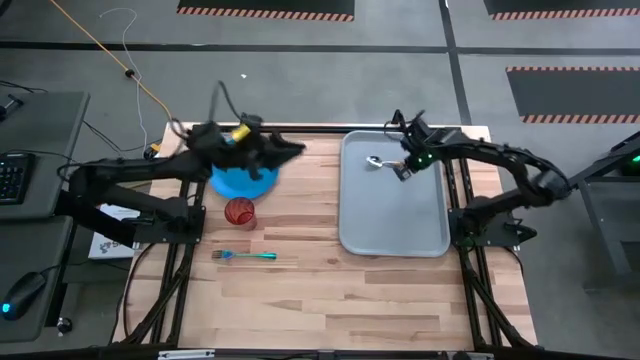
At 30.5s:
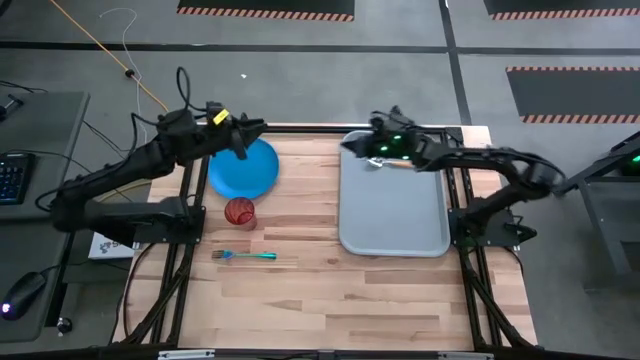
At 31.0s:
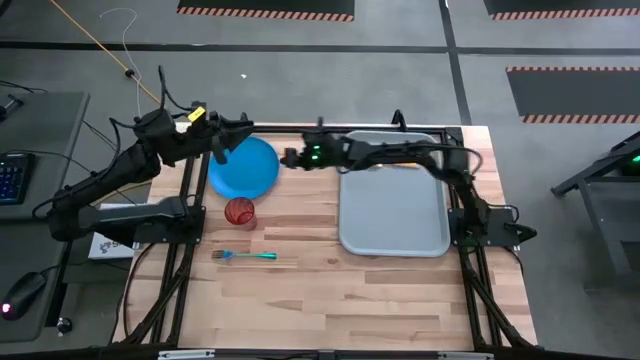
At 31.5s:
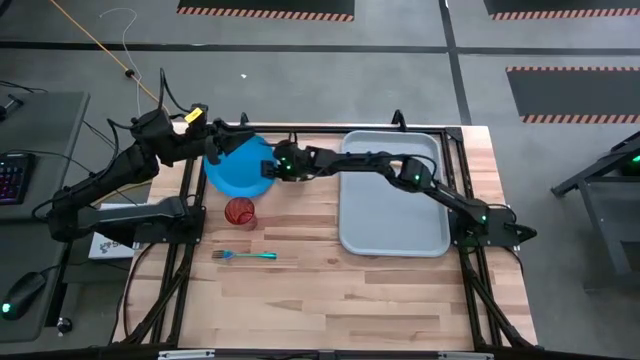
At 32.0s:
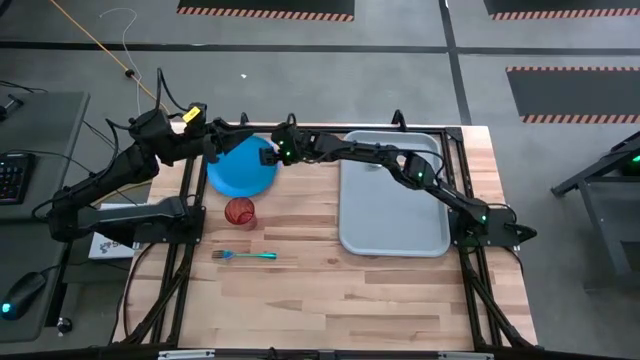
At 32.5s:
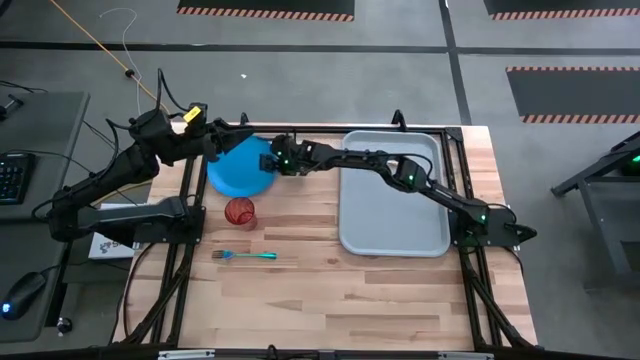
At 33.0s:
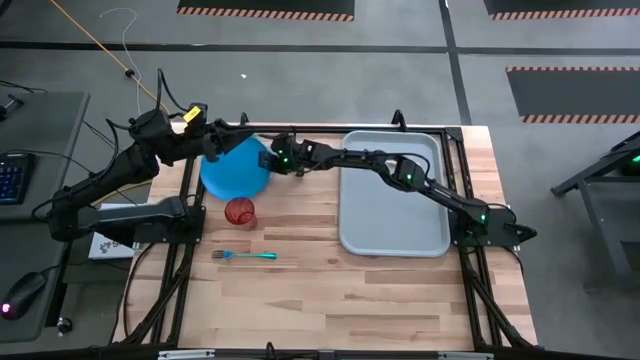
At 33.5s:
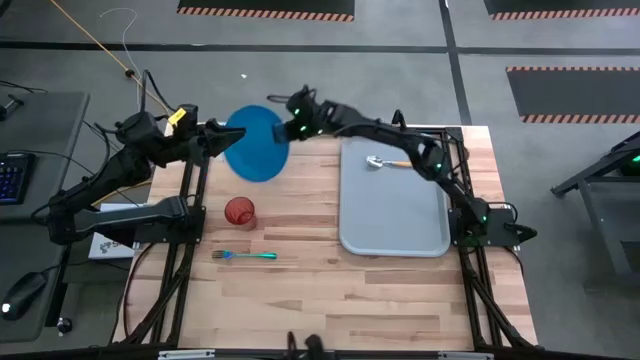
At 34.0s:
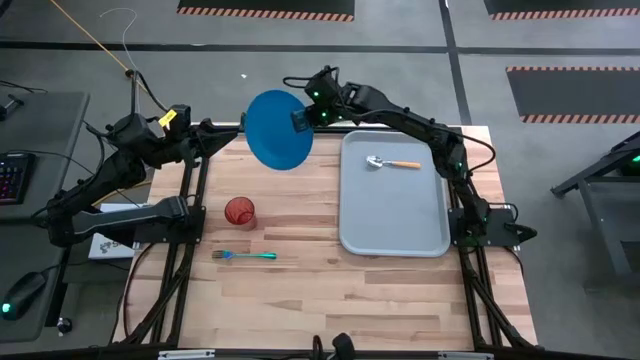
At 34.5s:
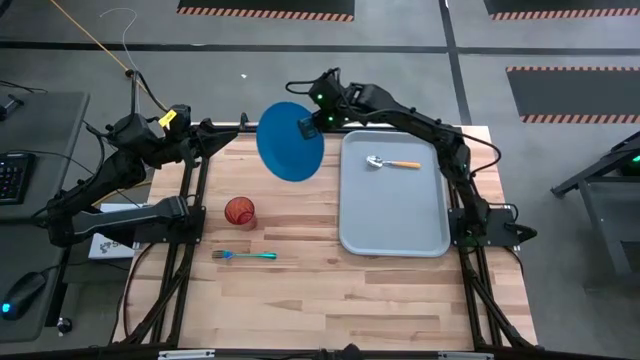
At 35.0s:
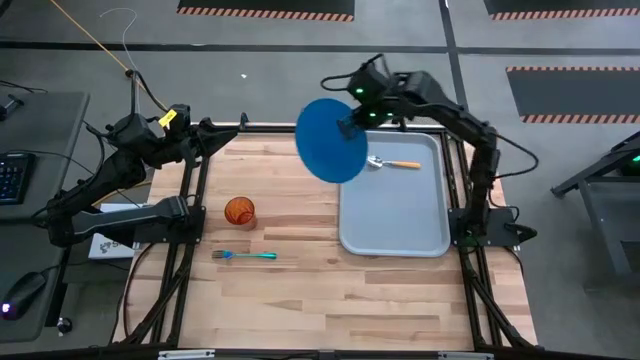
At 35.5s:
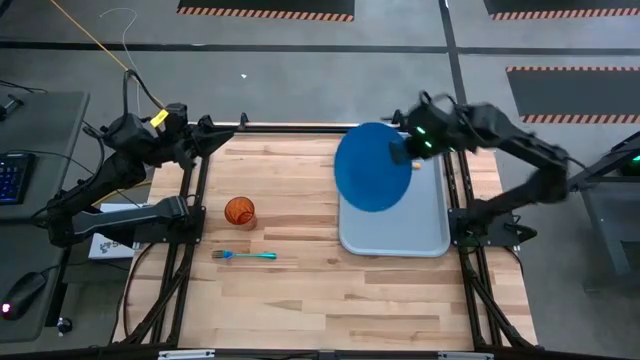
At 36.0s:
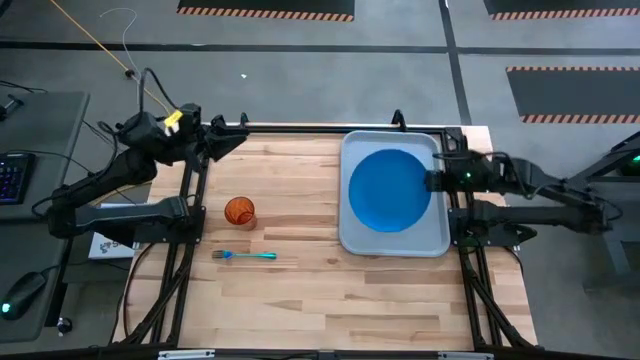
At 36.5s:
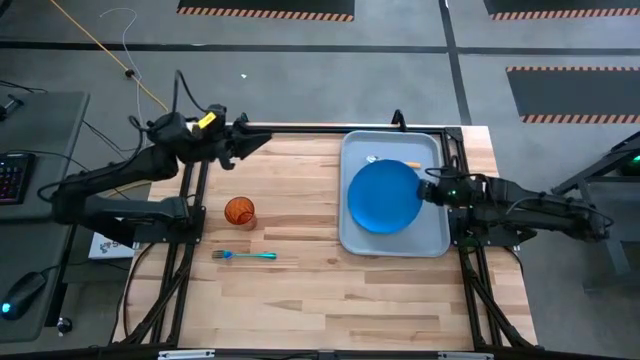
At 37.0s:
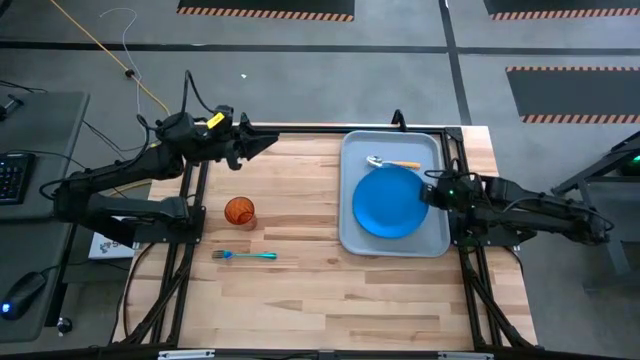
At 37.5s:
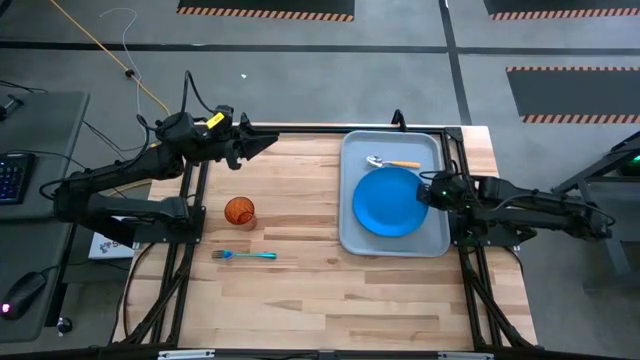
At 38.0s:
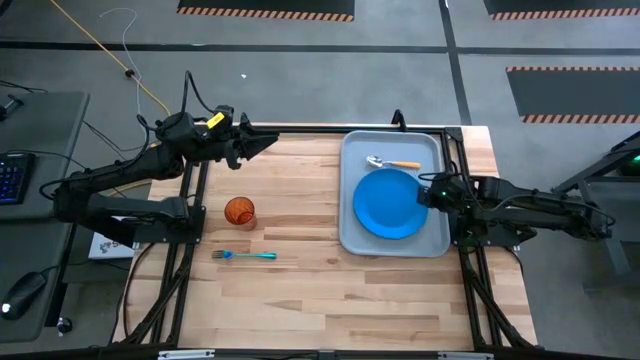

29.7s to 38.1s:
Task: Pick and place plate/cup/fork/spoon on tray
Put the blue plate to the left of the yellow spoon on the gray serving tray

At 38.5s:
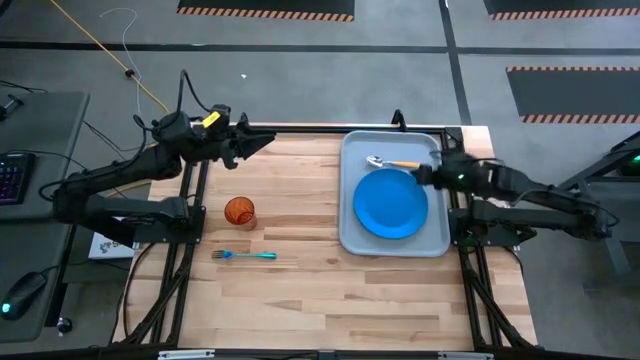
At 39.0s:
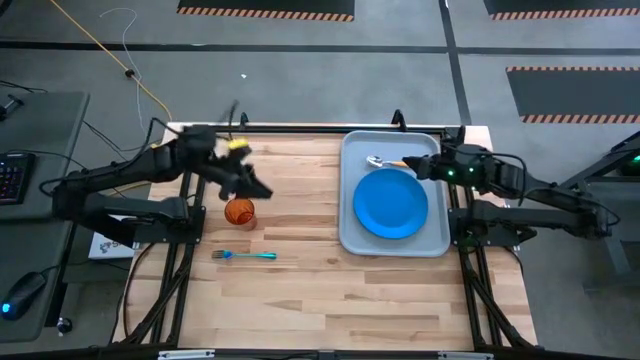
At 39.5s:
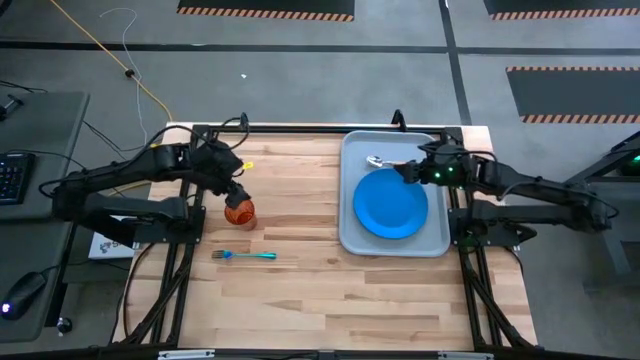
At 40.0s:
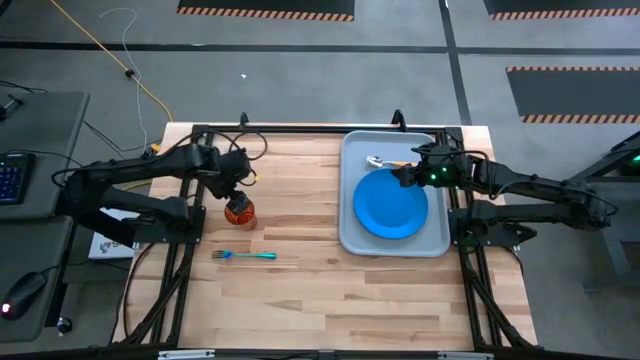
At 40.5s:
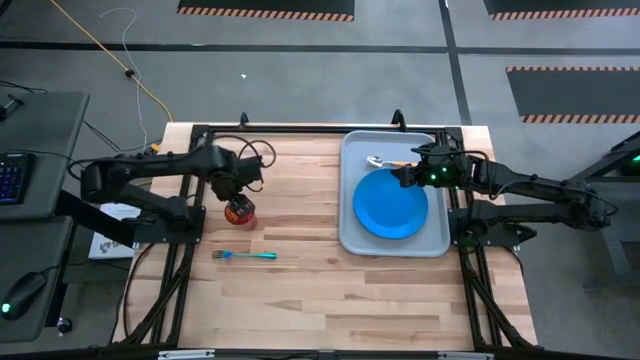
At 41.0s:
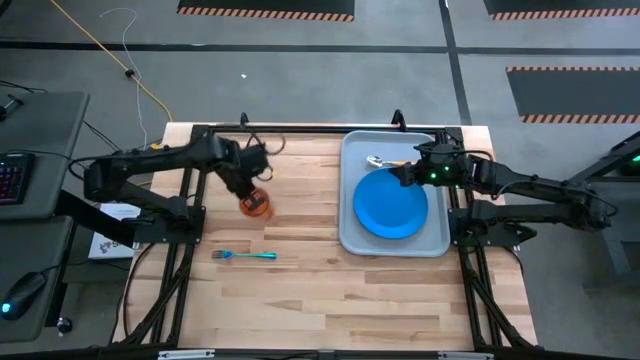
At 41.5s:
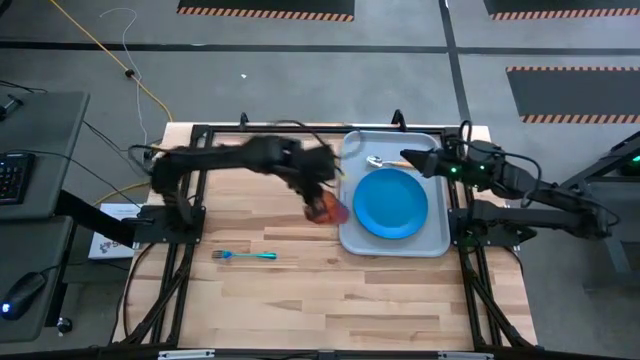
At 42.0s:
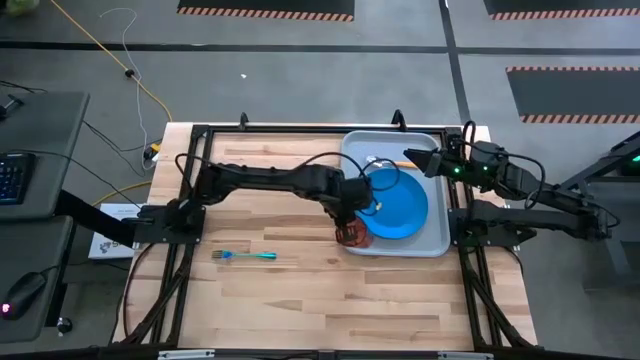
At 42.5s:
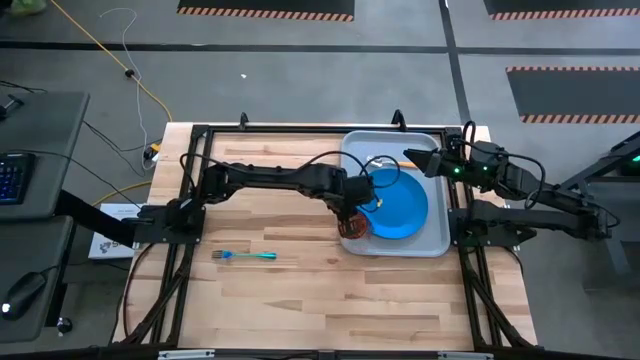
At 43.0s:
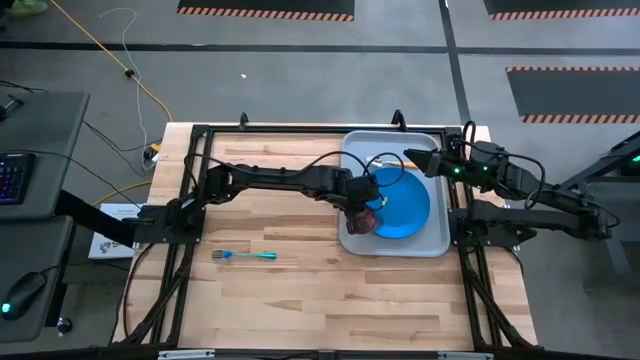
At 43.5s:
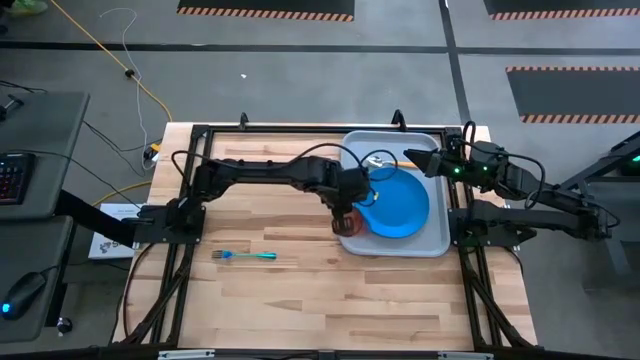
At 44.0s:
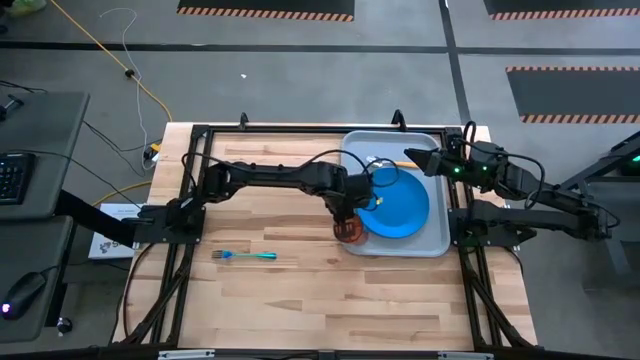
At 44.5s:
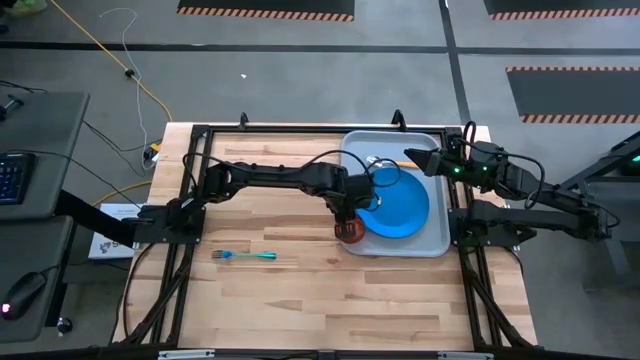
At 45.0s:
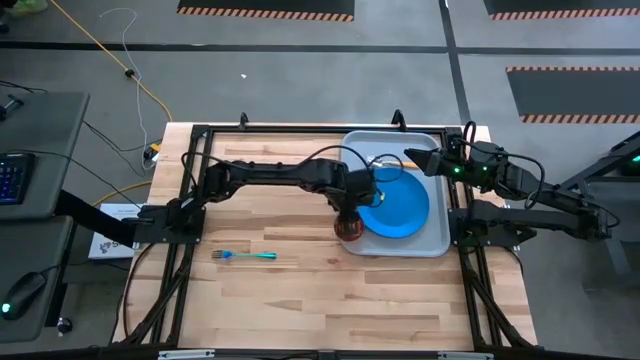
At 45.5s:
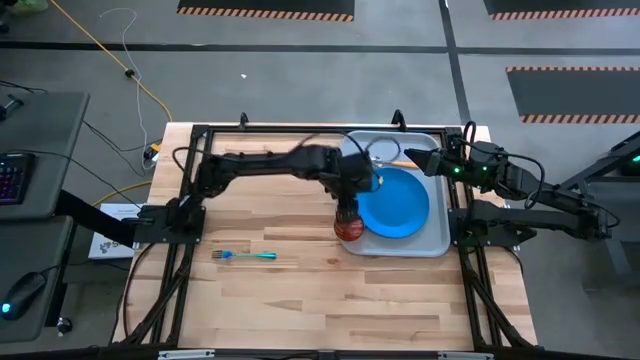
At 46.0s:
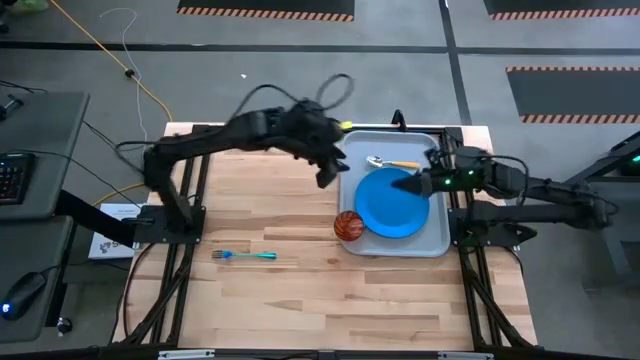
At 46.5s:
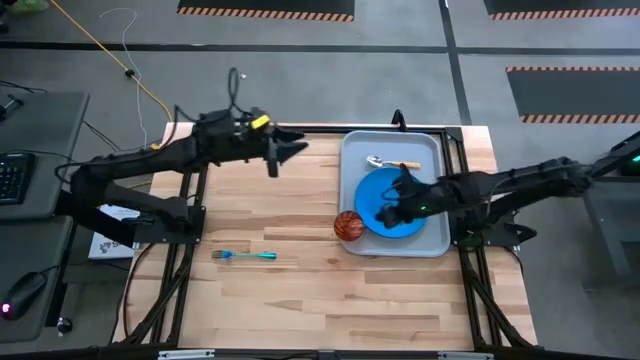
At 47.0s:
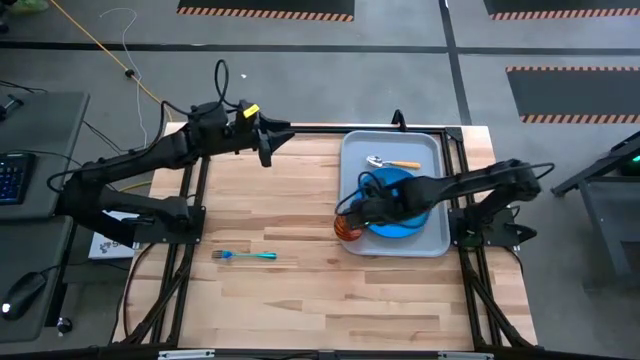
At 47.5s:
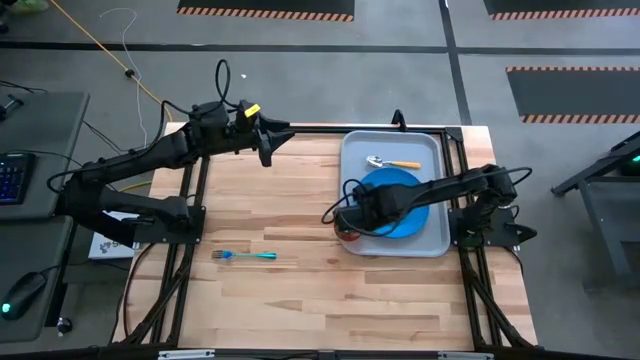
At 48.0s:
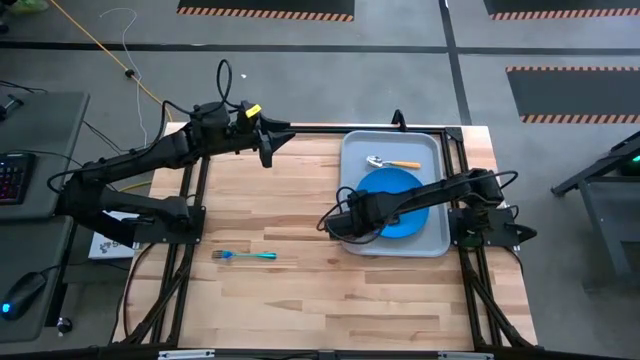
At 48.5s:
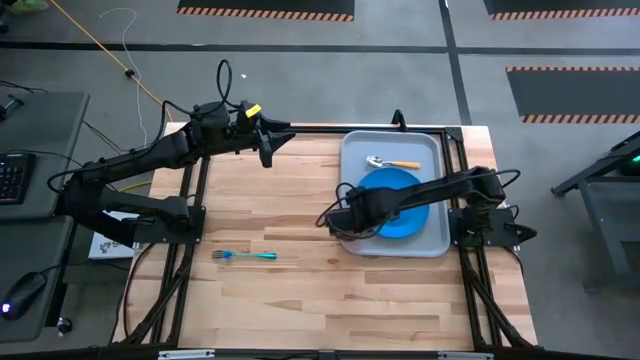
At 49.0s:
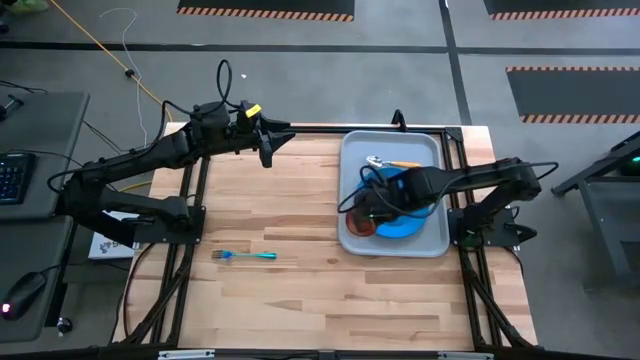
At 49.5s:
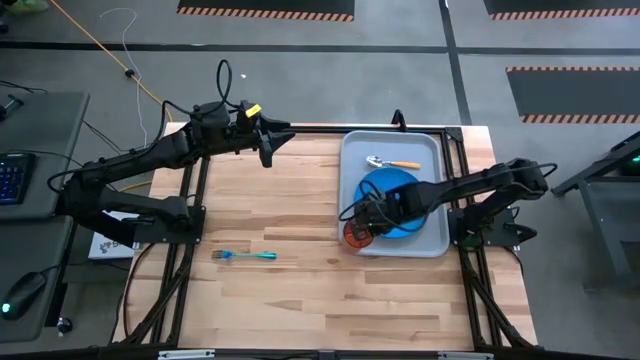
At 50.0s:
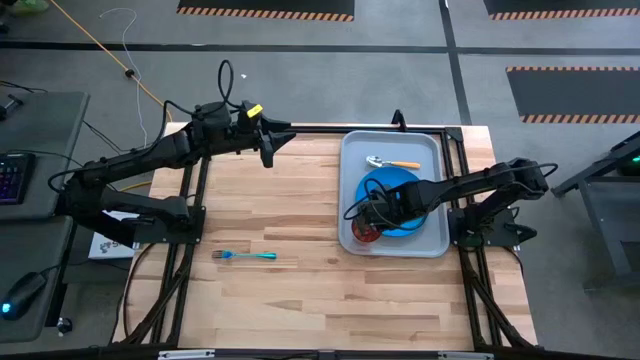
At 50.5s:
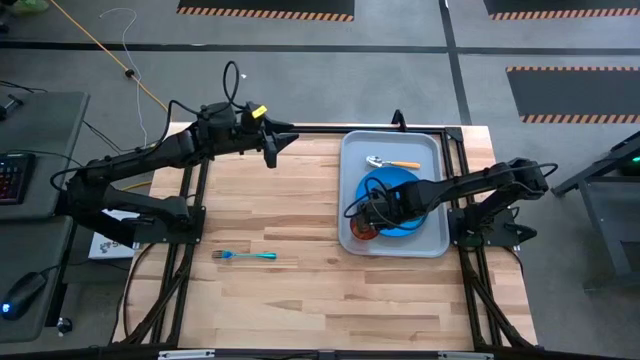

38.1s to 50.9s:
Put the brown cup to the top left of the blue plate on the gray serving tray

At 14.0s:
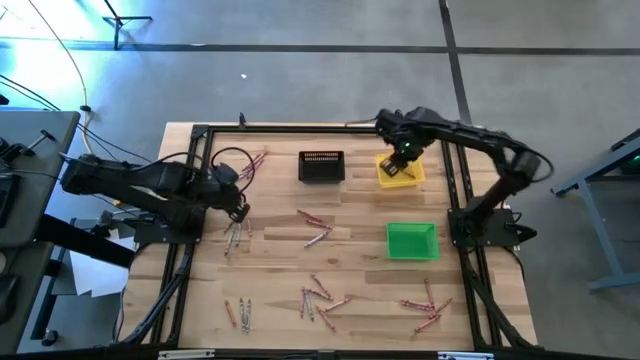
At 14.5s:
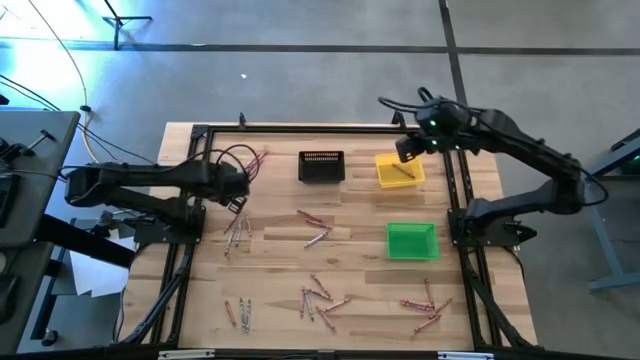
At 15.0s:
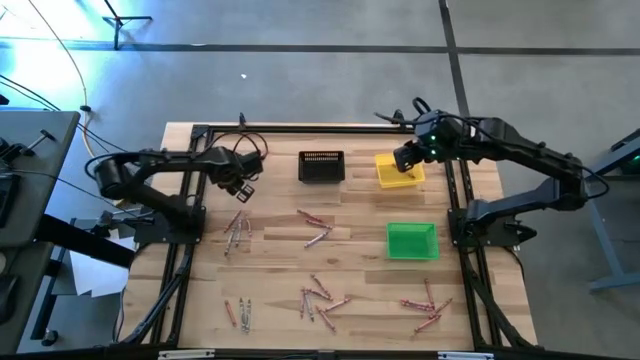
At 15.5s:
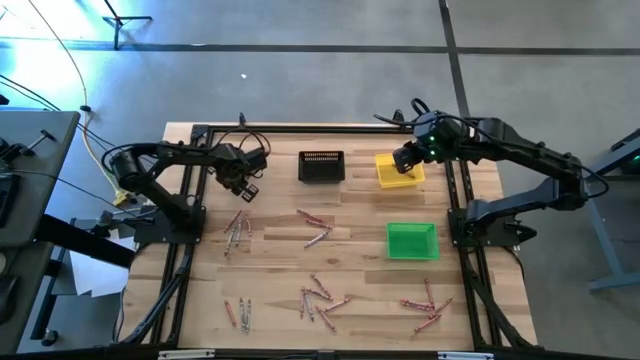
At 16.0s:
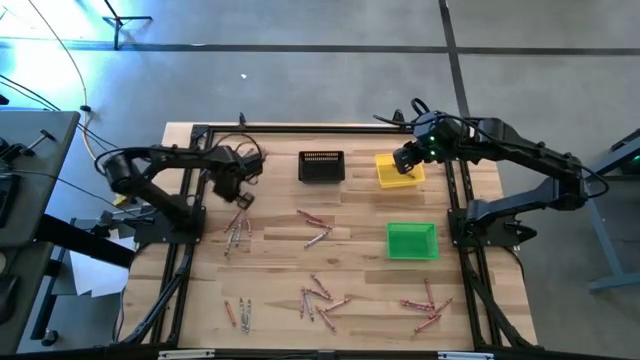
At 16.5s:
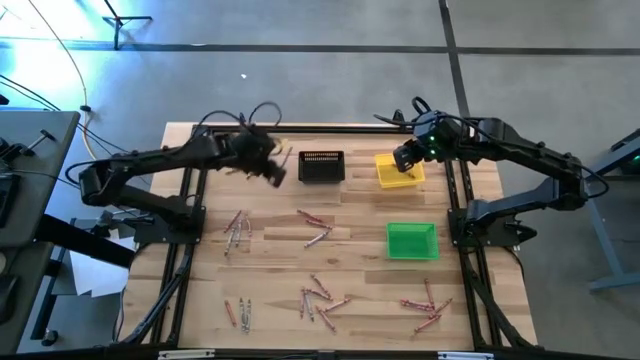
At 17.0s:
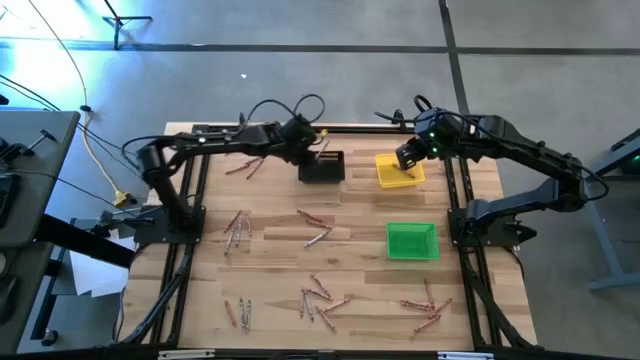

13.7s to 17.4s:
Task: Sort crayons
Put the gray crayon into the black basket
